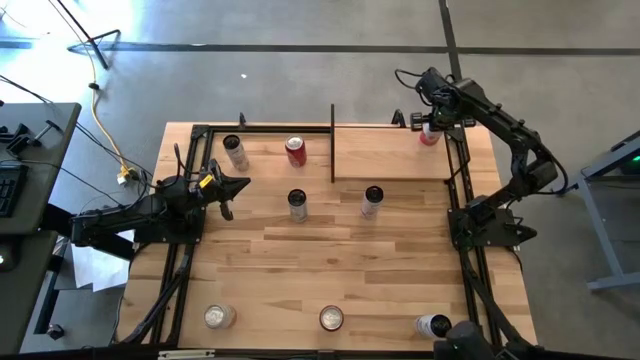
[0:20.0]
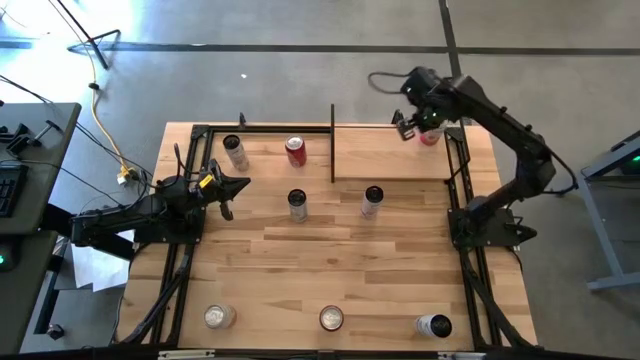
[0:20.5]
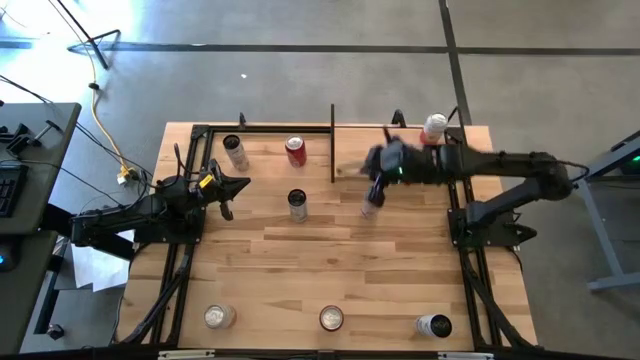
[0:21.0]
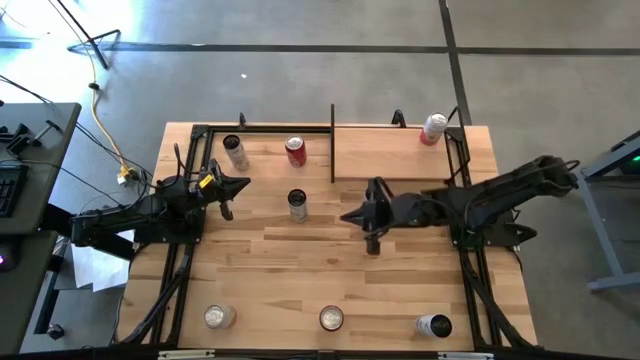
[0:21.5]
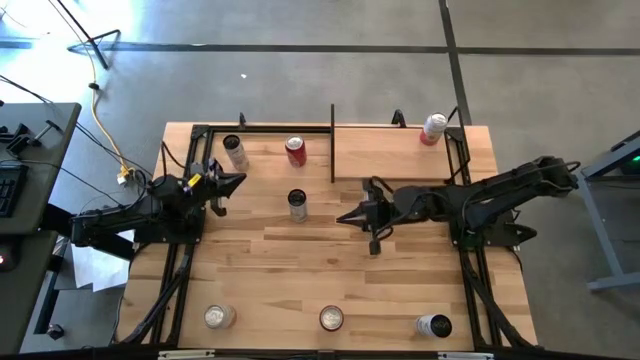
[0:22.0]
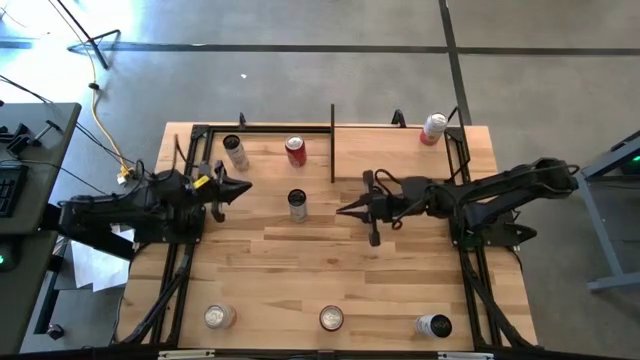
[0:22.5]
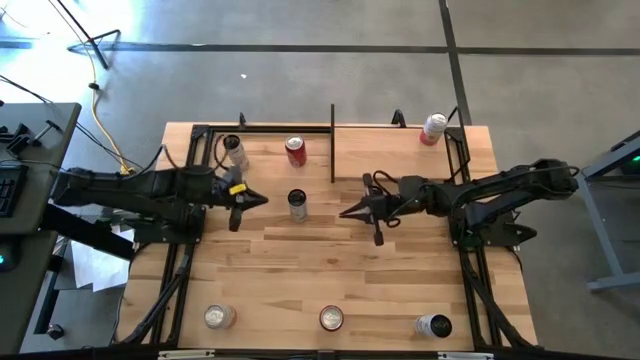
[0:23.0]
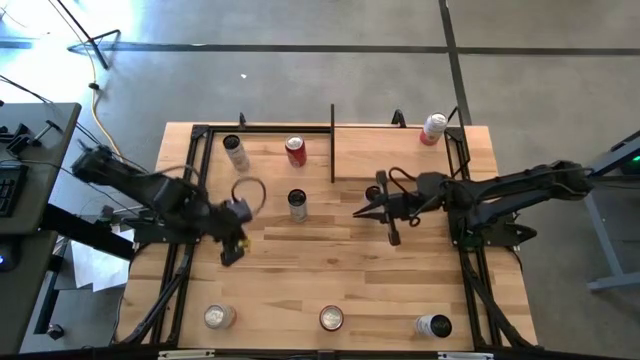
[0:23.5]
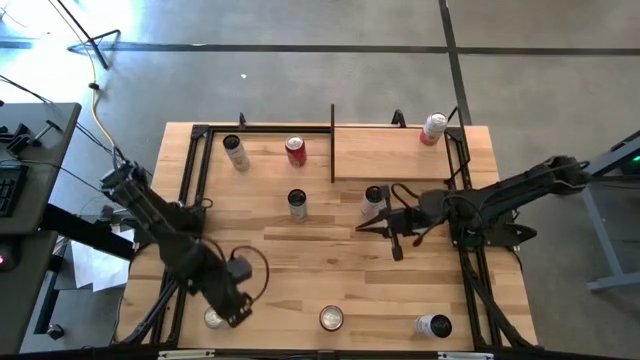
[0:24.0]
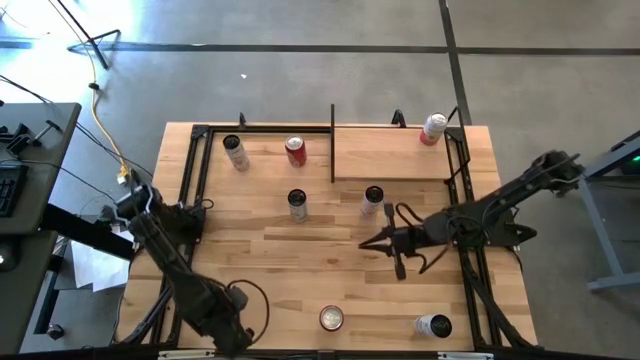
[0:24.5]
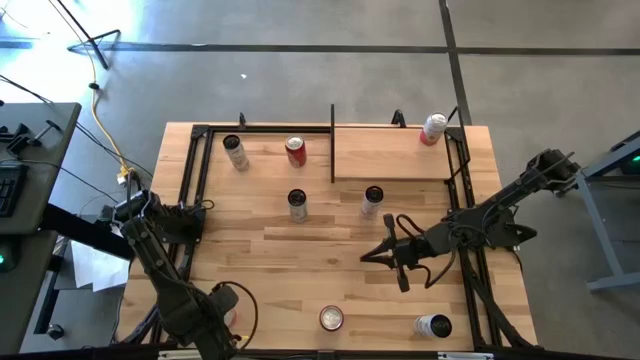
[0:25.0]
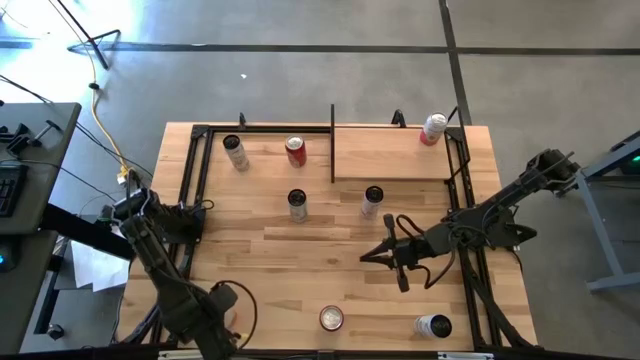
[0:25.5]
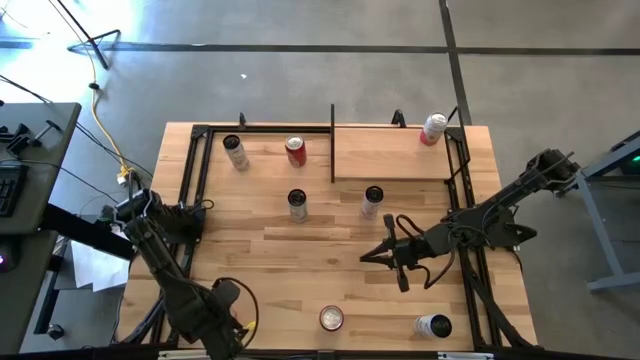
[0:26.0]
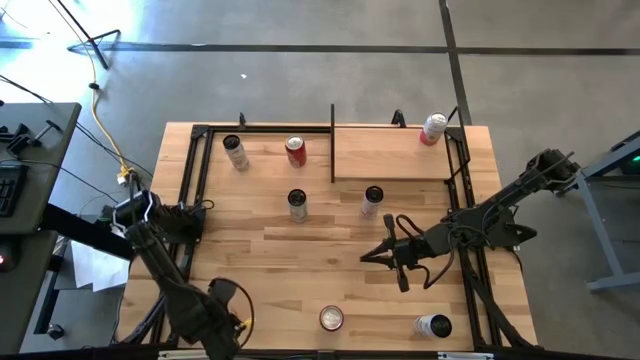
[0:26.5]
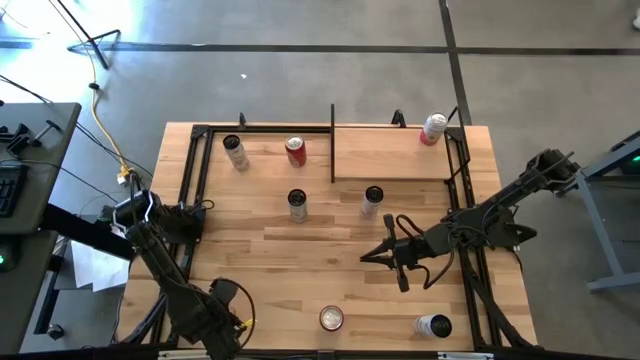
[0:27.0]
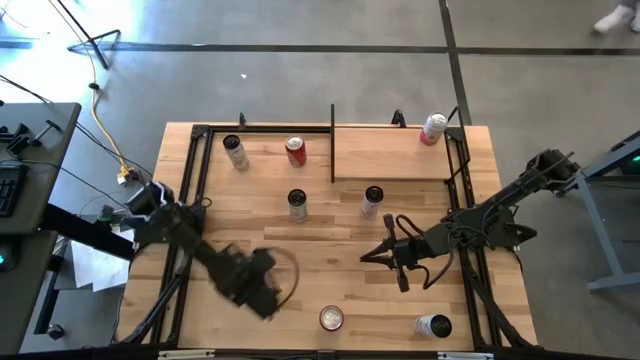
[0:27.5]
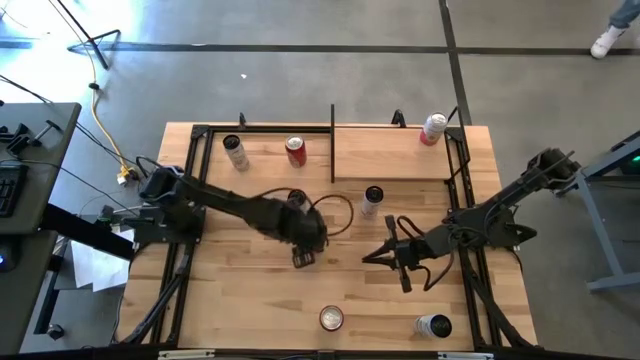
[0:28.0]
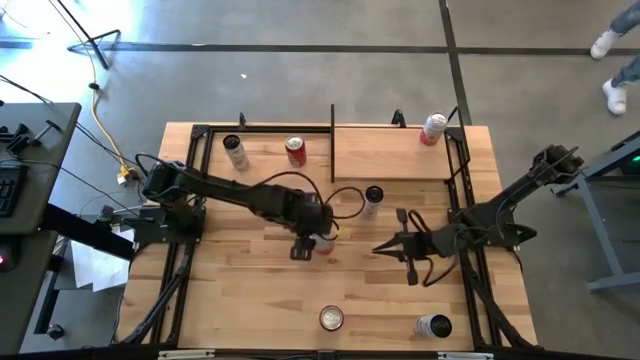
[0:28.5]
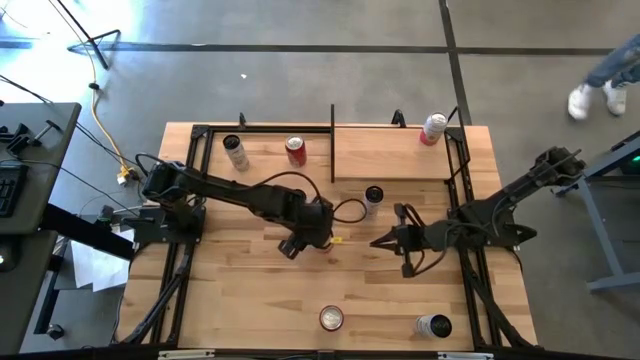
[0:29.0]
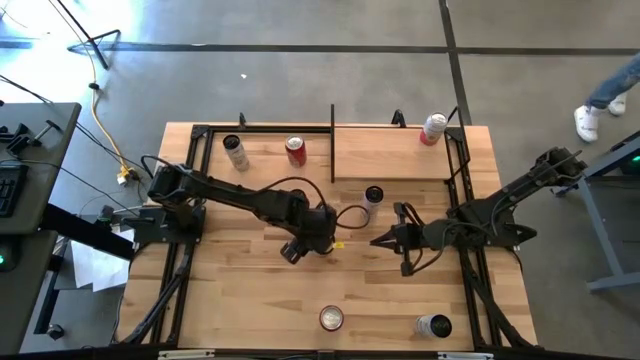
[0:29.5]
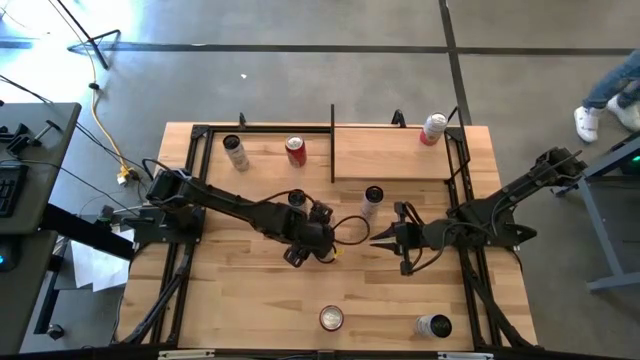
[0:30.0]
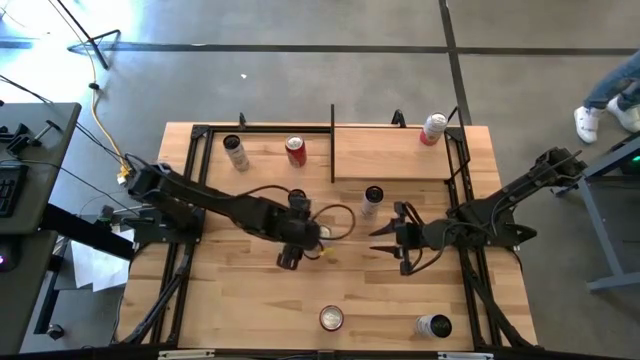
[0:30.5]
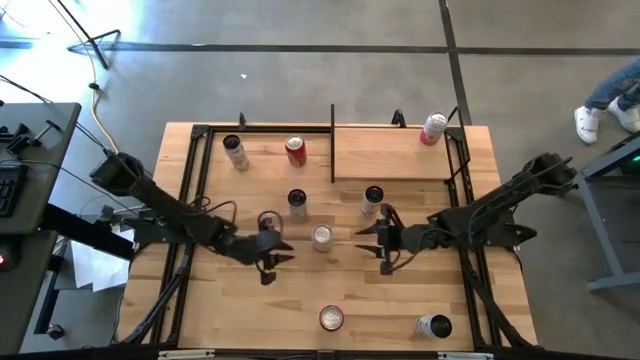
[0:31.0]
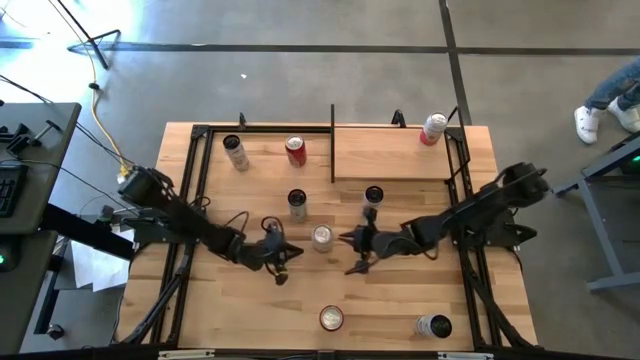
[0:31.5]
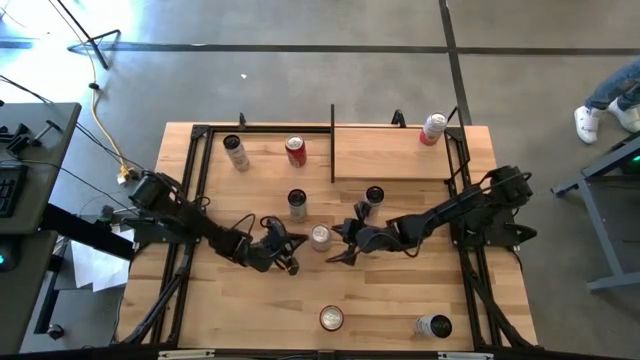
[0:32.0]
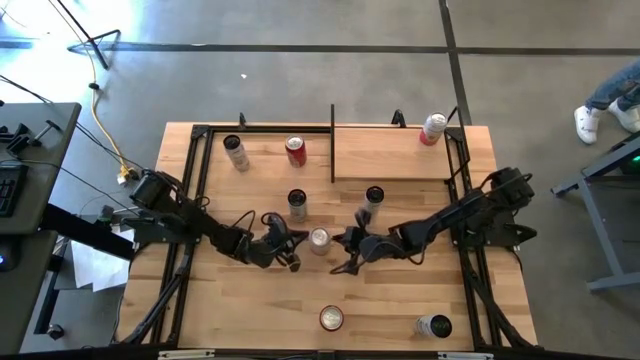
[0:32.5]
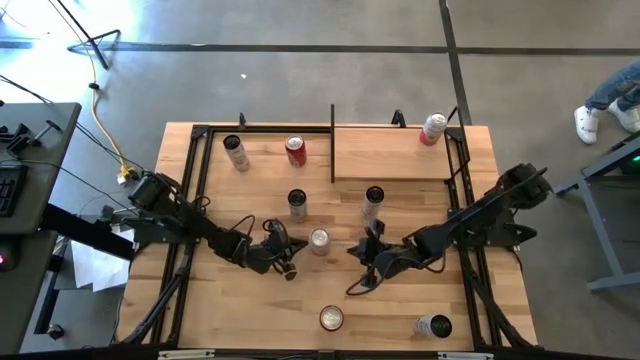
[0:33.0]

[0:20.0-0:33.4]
Task: Place canned beverage on shelf
Put the pink soda can on the shelf aligned with the other pink soda can

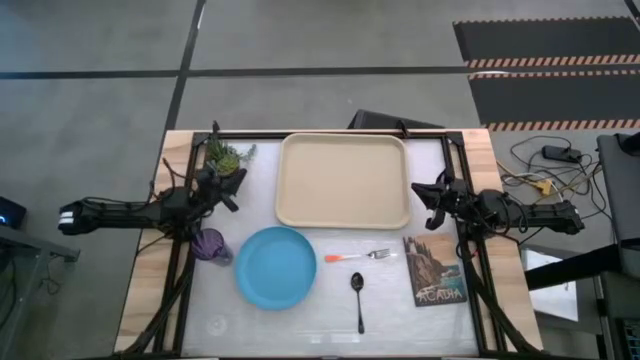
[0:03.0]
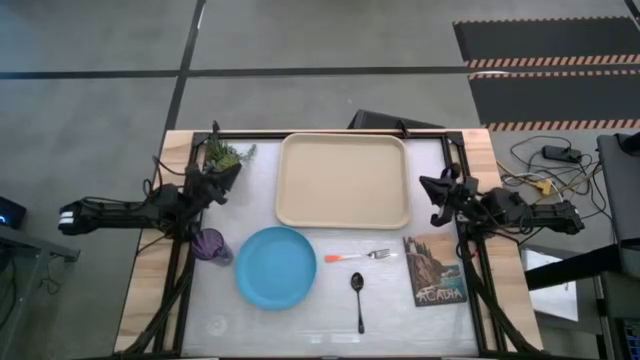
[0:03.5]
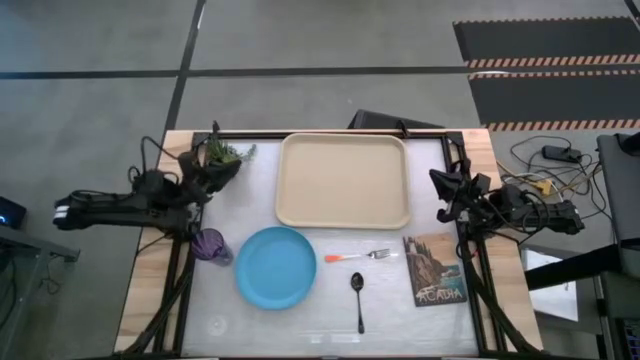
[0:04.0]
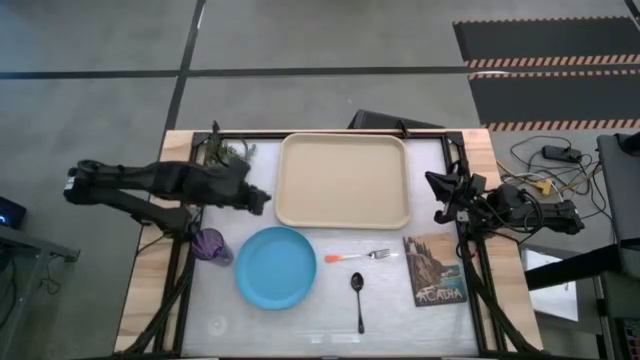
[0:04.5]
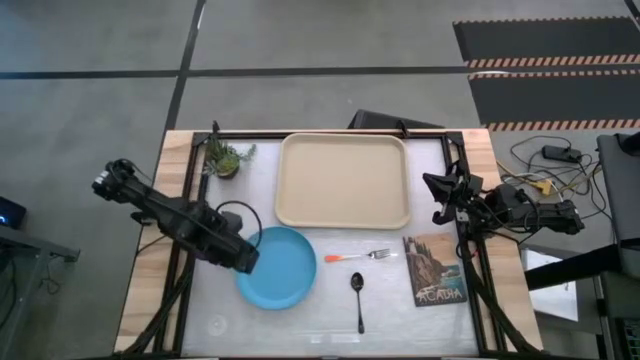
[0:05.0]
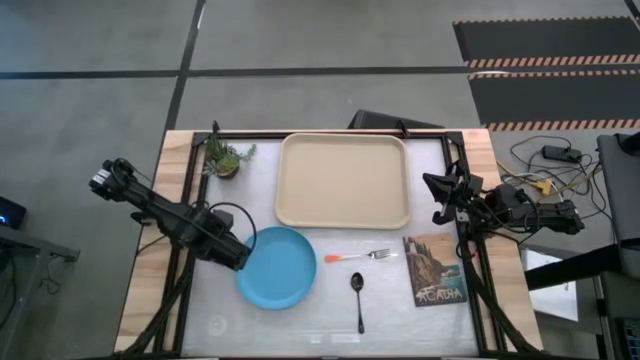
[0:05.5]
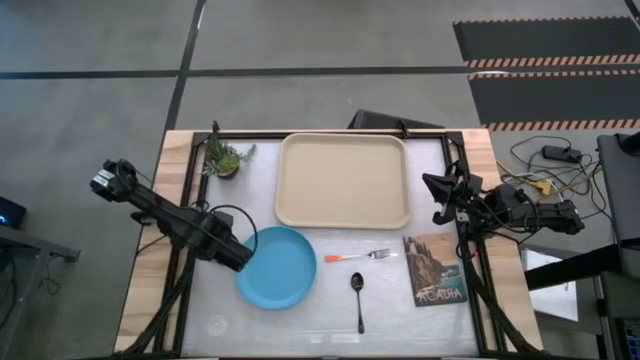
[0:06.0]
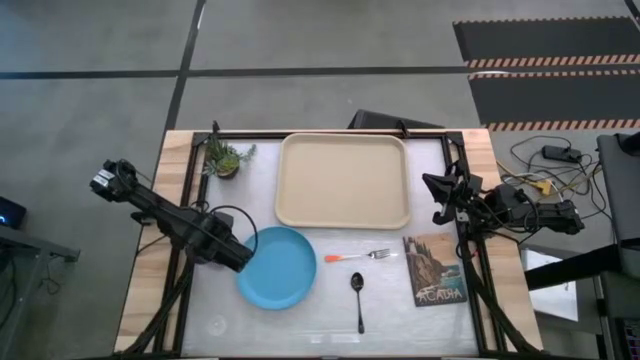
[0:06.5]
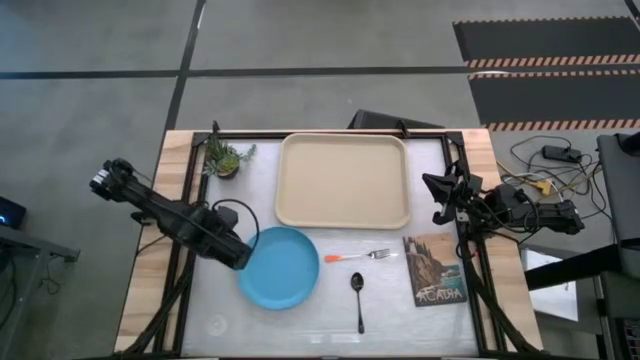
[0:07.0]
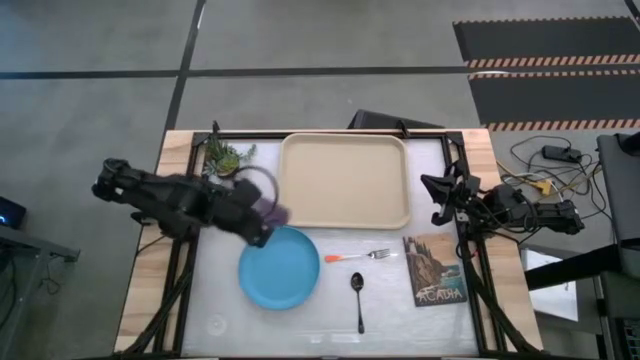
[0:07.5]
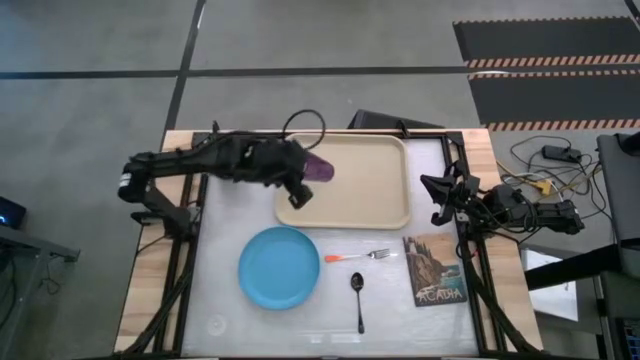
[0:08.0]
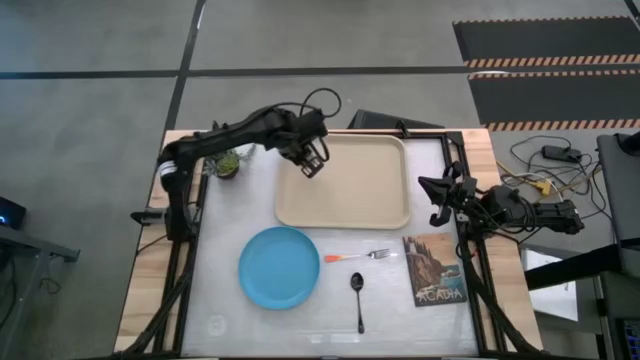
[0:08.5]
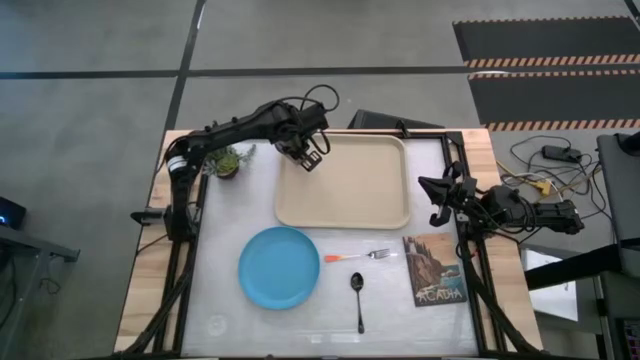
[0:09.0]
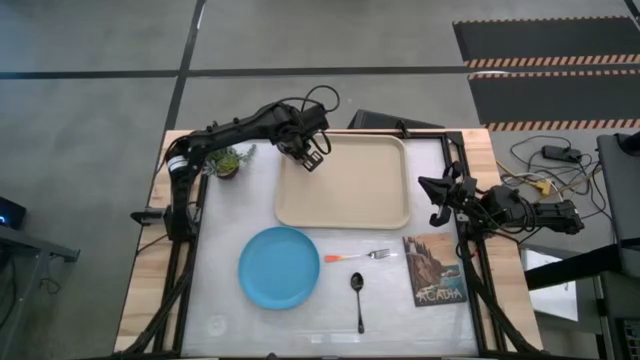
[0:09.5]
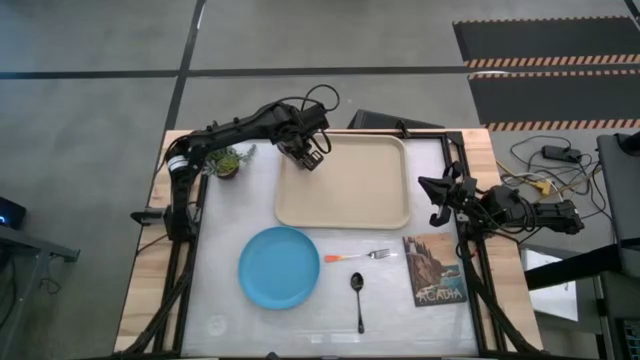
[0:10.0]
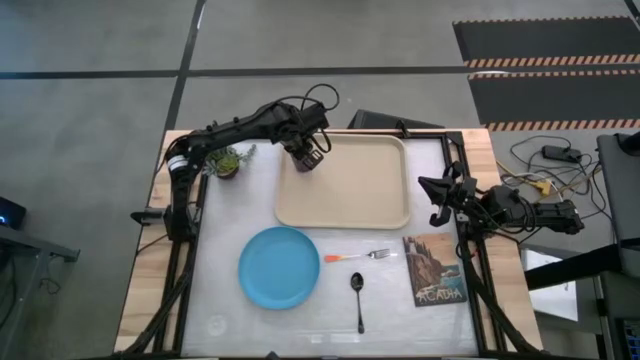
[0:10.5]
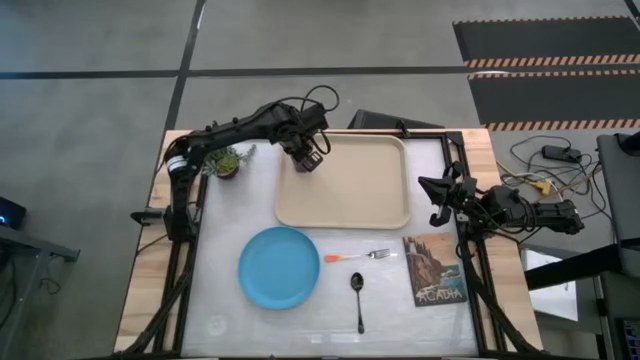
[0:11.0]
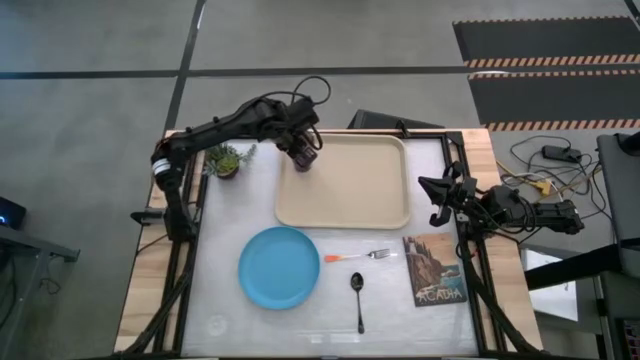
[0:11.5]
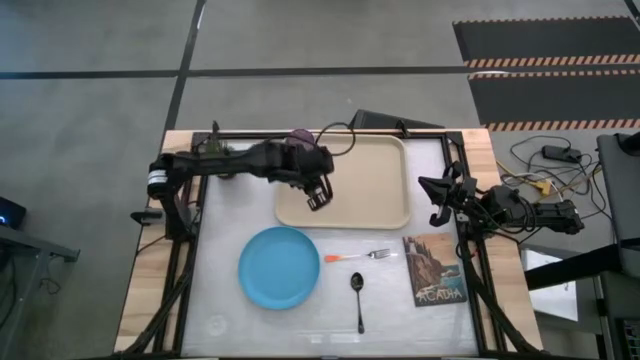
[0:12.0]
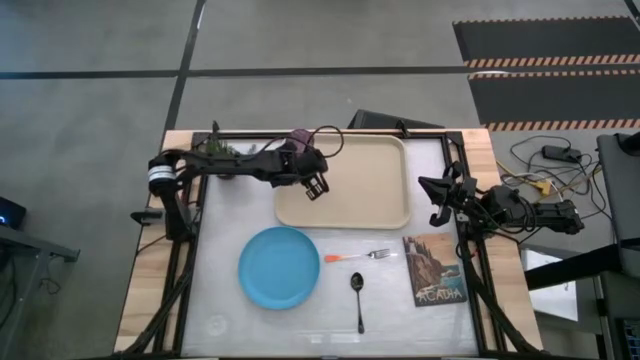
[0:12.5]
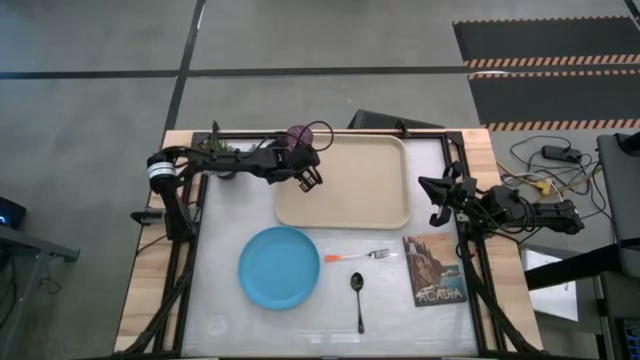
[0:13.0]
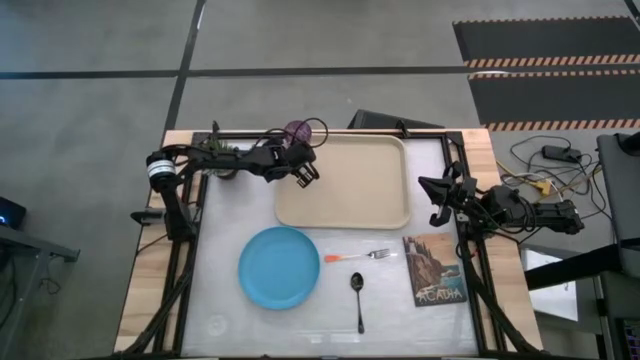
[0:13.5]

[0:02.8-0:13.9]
Task: Pick and place plate/cup/fork/spoon on tray
Put the violet glass on the top left of the white serving tray
